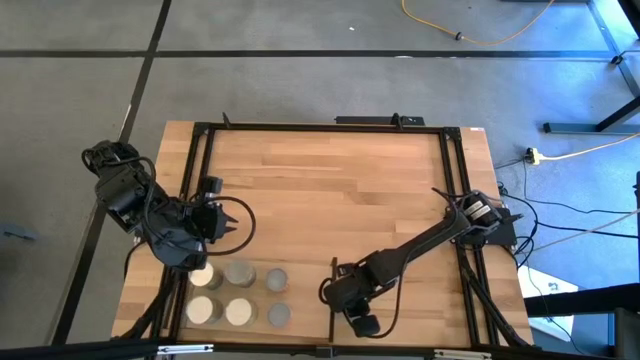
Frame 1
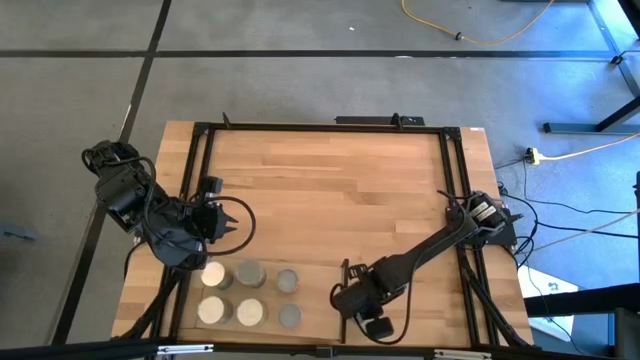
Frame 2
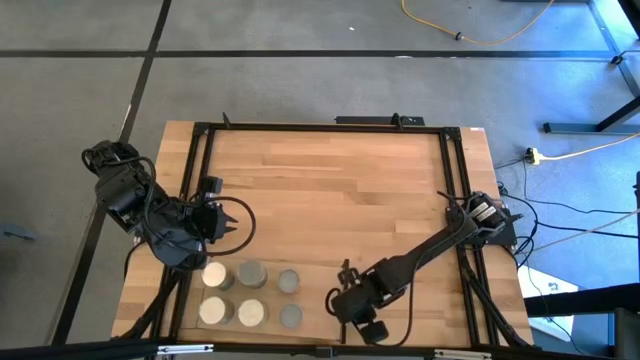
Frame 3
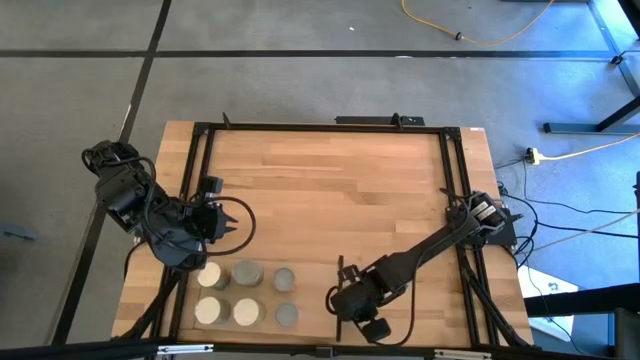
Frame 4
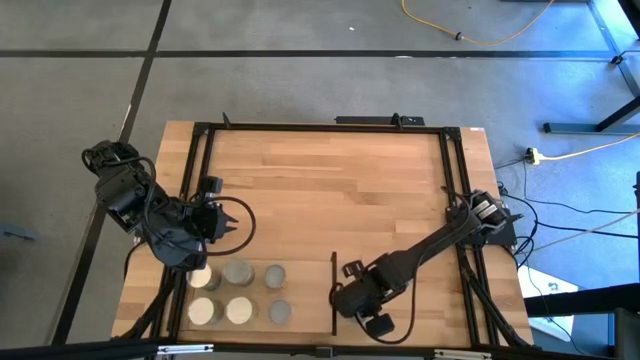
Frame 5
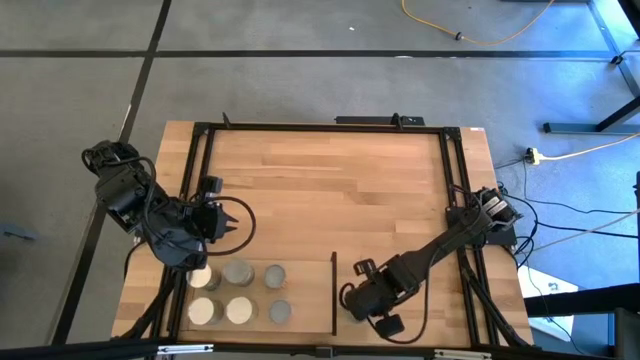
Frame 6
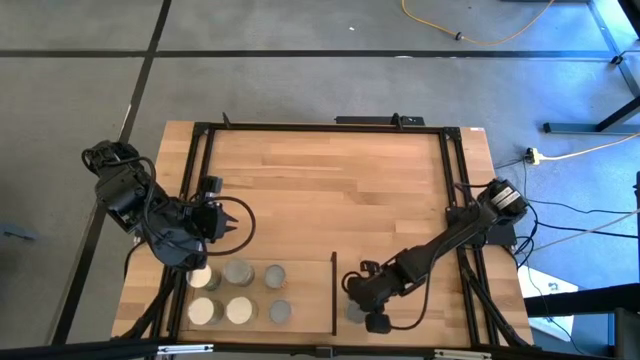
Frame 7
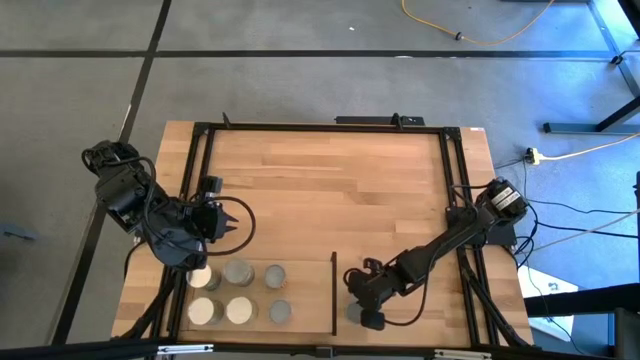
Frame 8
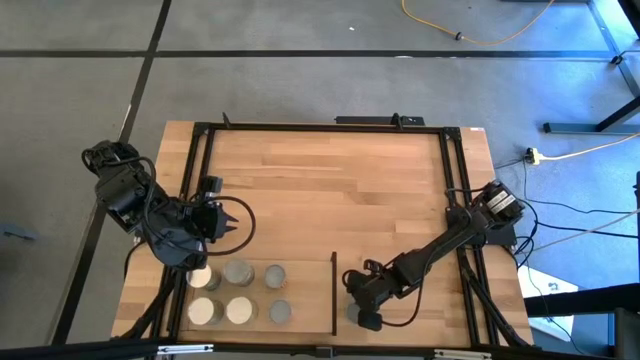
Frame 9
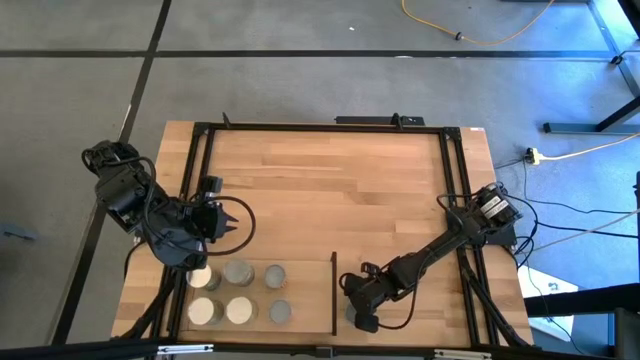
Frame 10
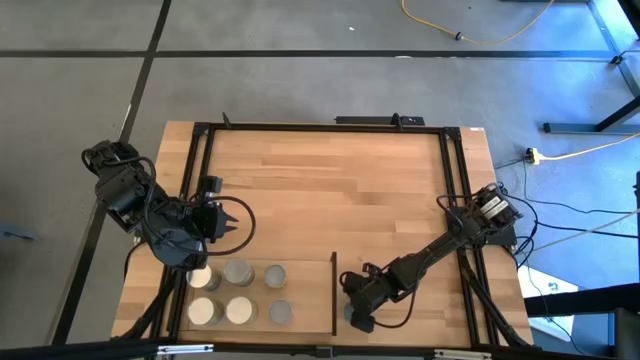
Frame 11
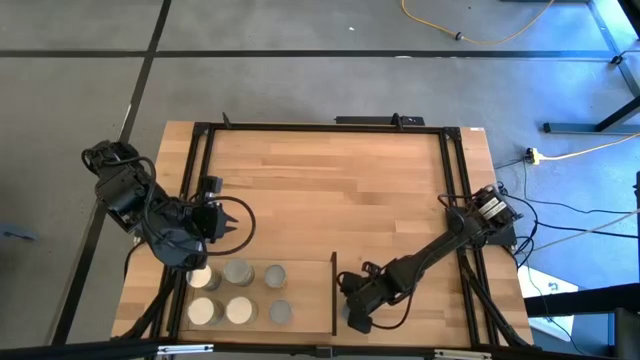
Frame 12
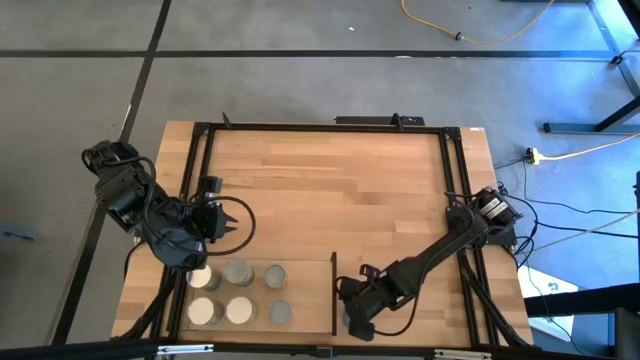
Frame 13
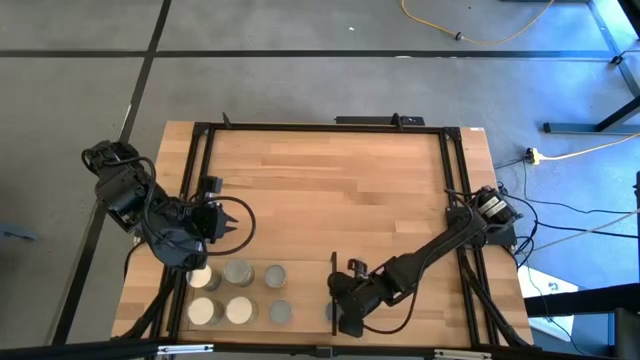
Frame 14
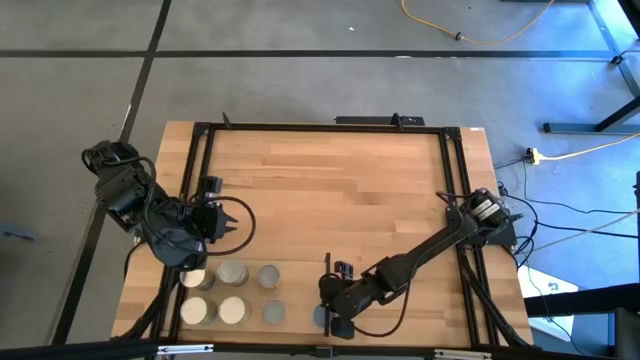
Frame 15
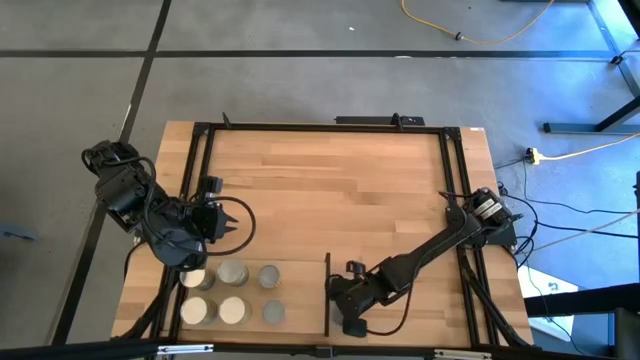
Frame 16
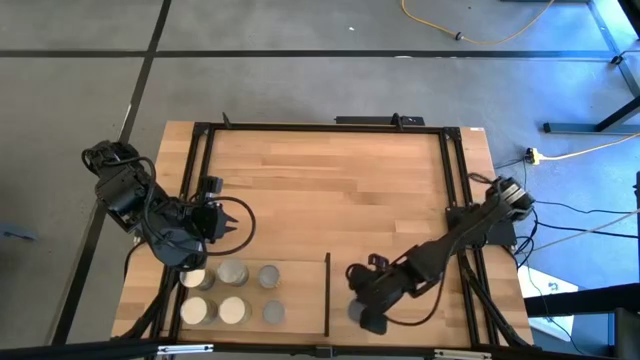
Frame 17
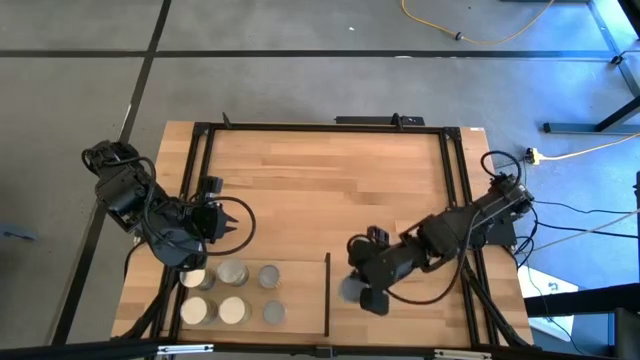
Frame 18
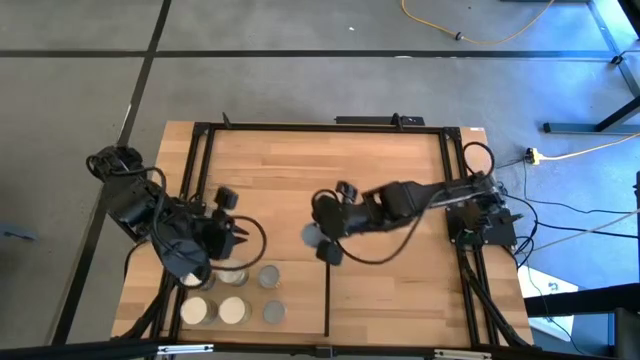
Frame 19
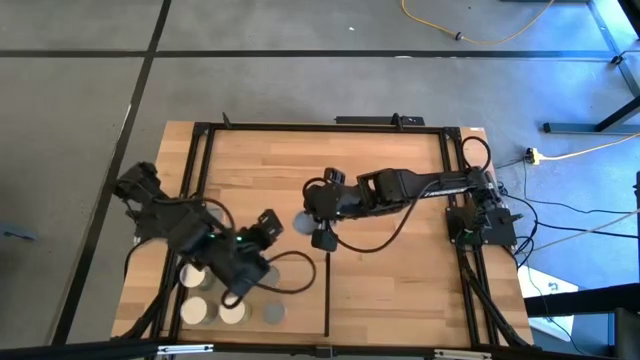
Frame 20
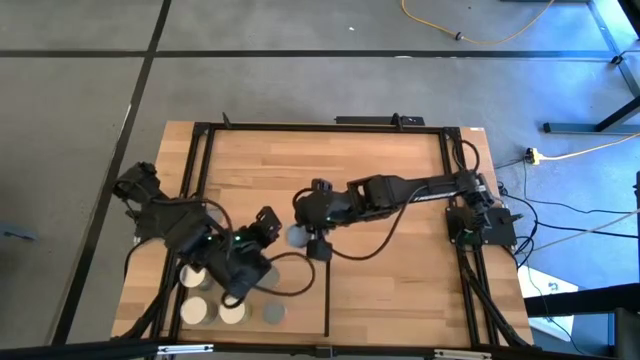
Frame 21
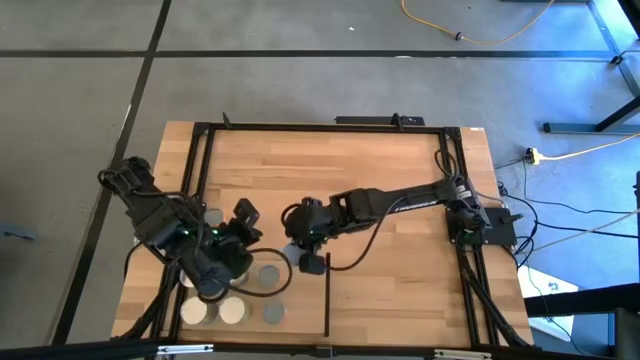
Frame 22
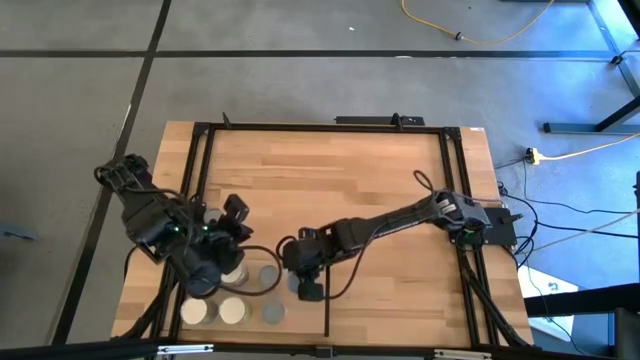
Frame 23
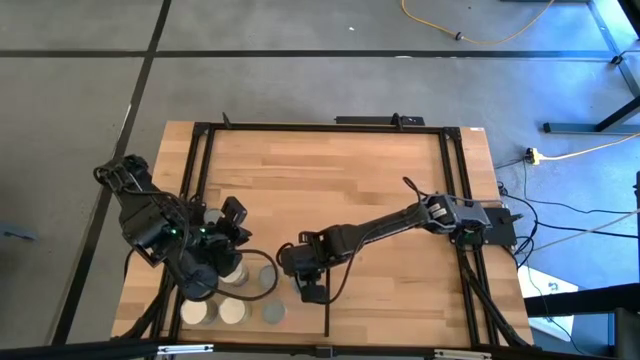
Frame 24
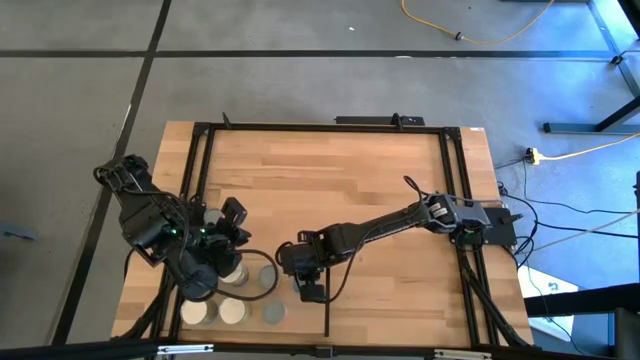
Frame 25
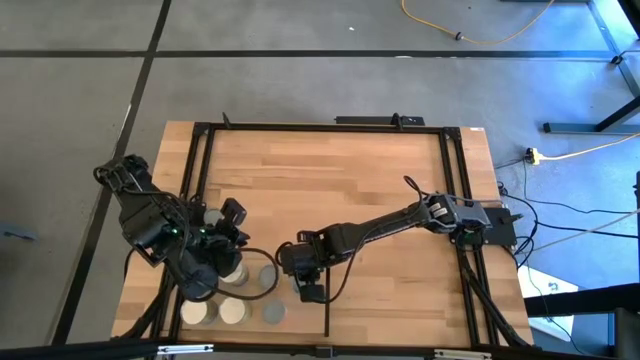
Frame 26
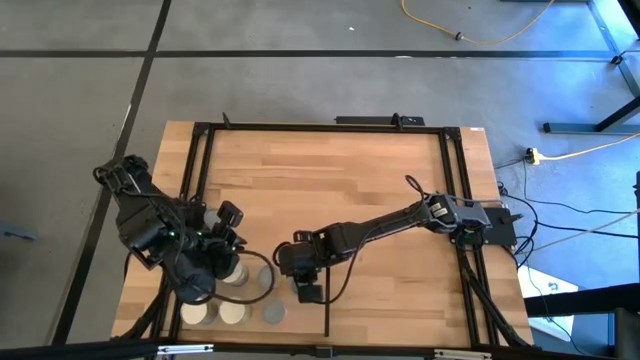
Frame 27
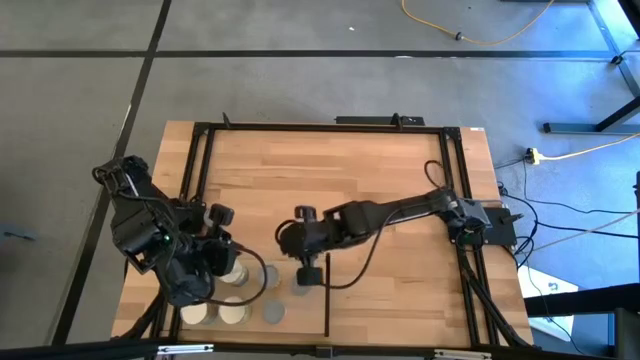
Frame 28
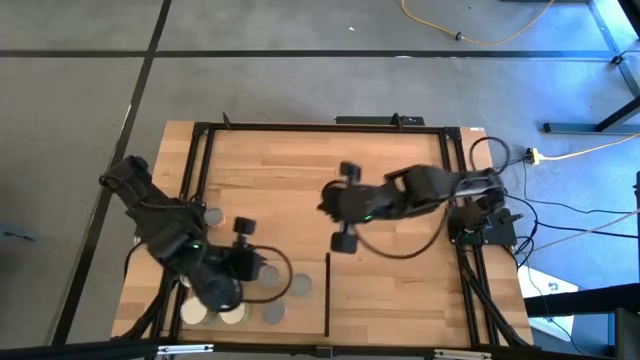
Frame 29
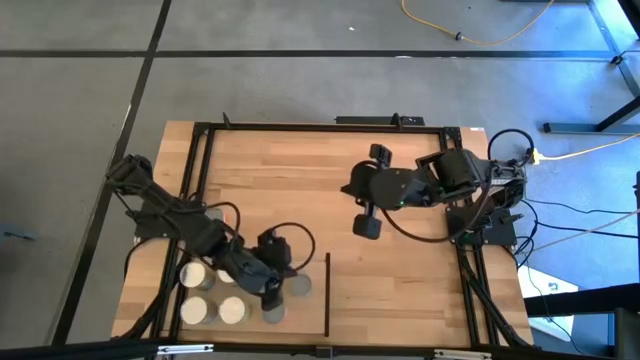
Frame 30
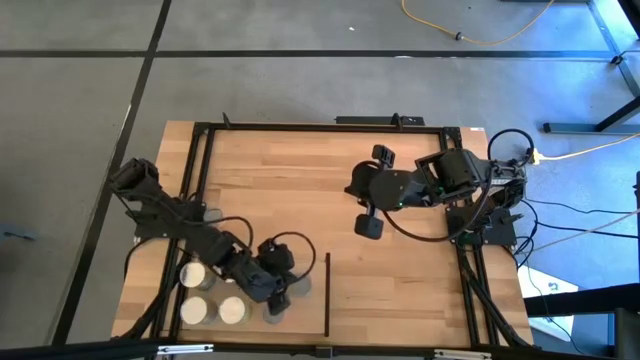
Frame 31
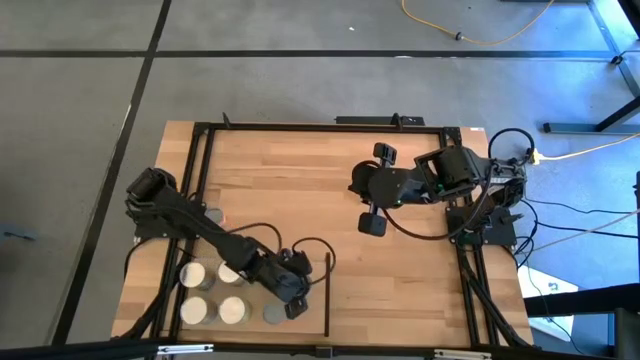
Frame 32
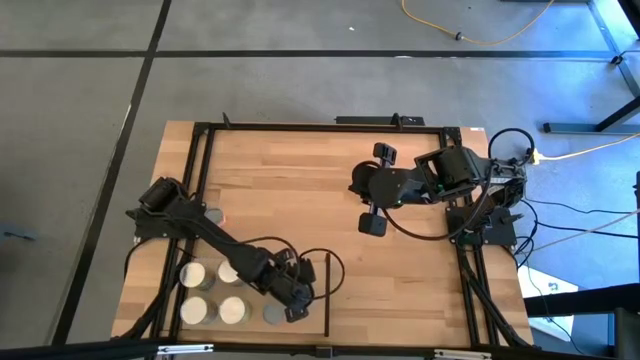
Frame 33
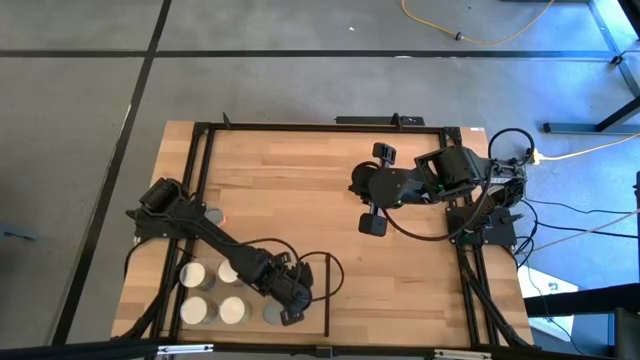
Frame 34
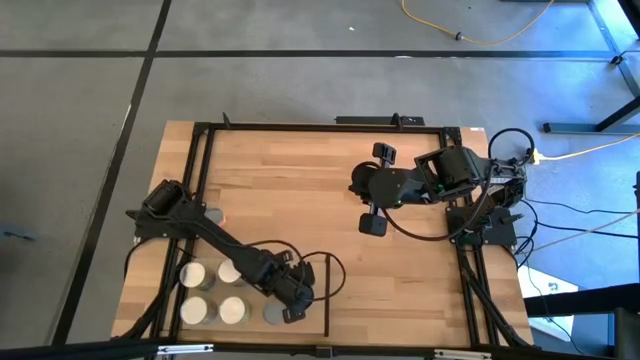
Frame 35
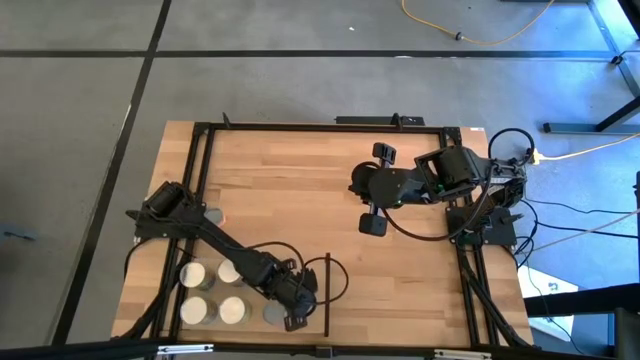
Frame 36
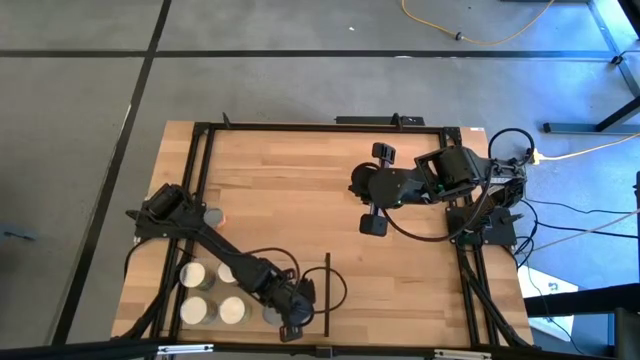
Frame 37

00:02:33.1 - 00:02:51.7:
Task: Pick and place cans onto a shelf
Put the canned tuna on the shelf

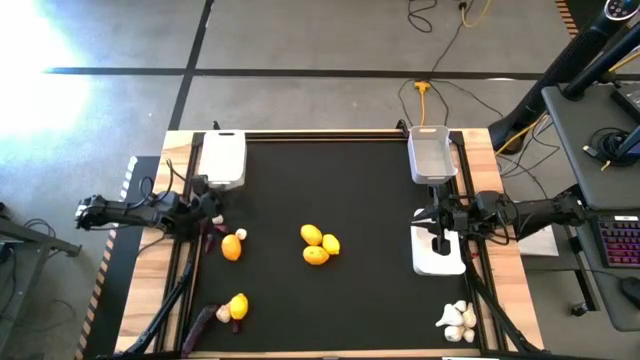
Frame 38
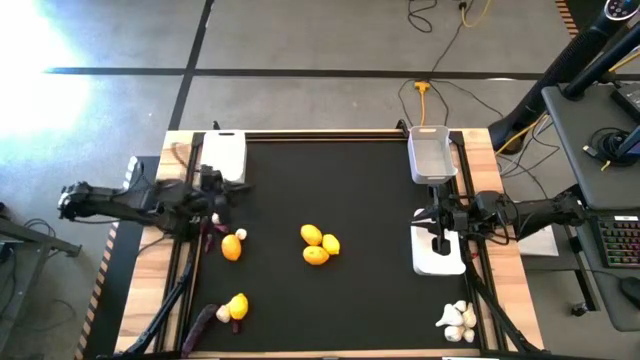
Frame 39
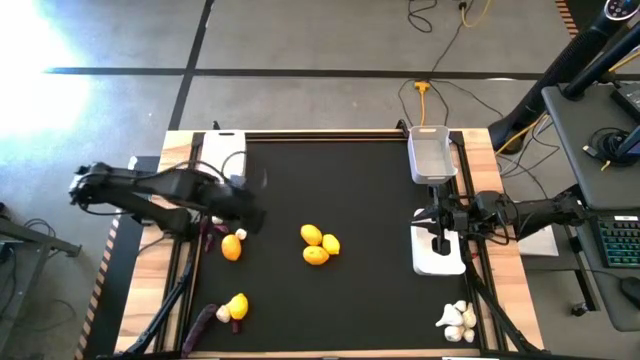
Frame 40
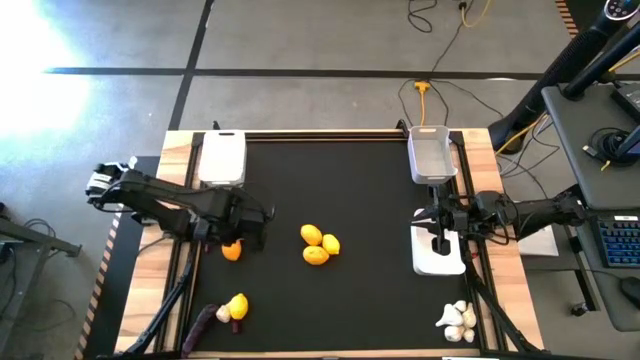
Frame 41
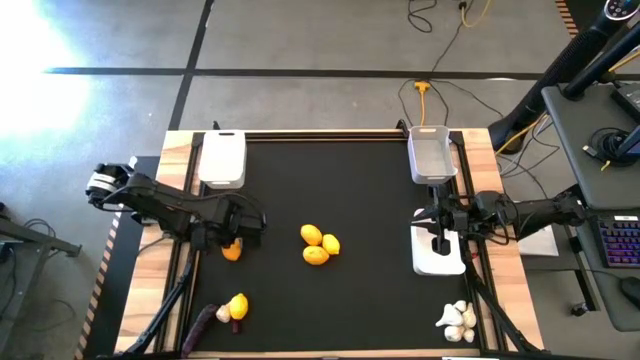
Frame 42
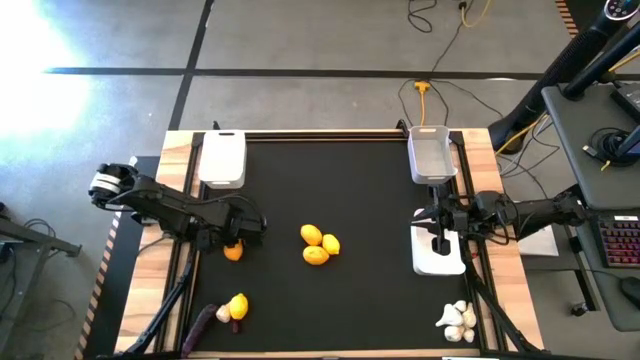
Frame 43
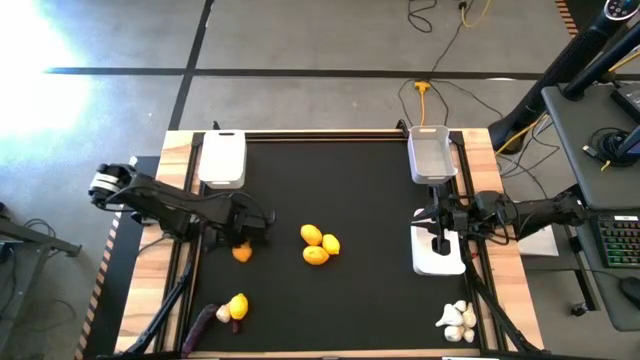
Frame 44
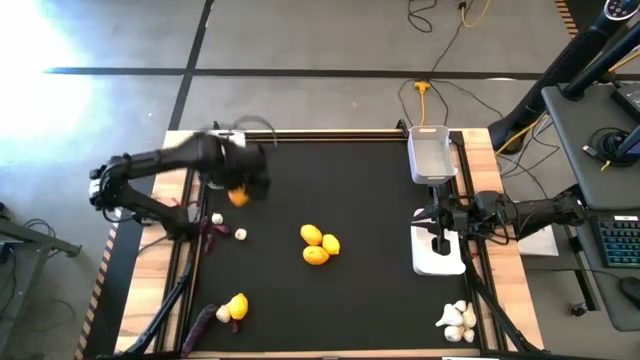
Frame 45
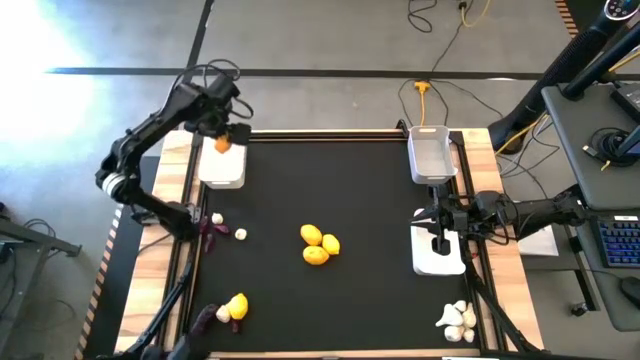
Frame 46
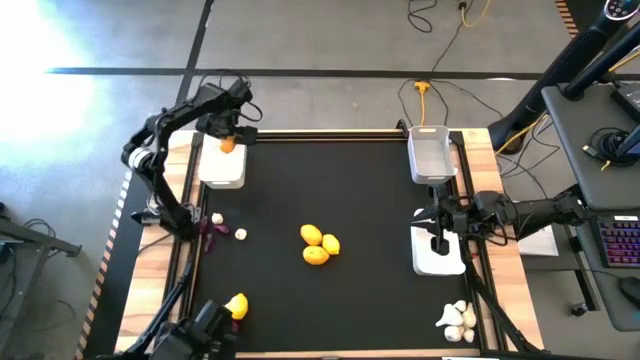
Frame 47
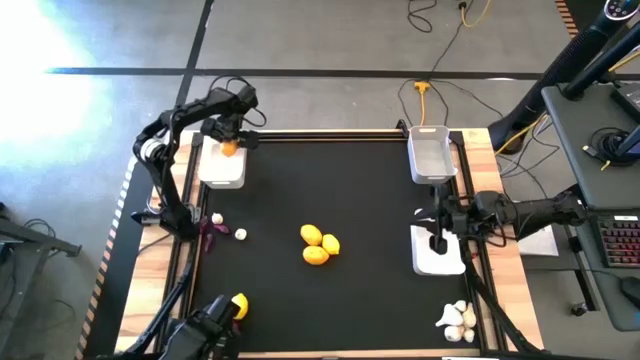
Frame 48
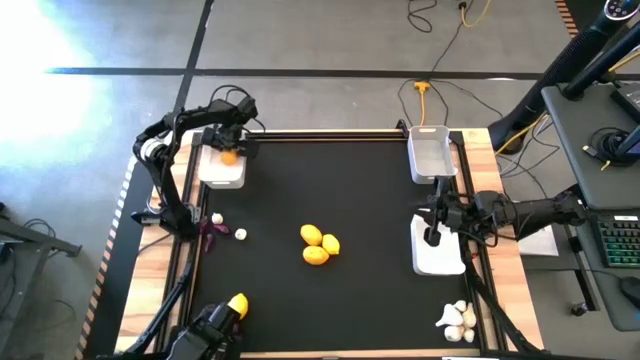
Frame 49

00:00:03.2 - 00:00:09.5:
Task: Sort produce into baskets
Put the top left yellow lemon into the left white bin
